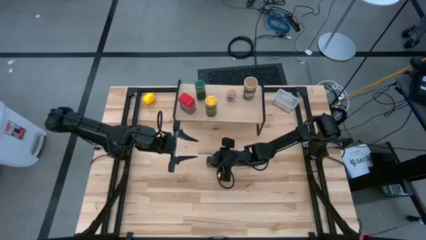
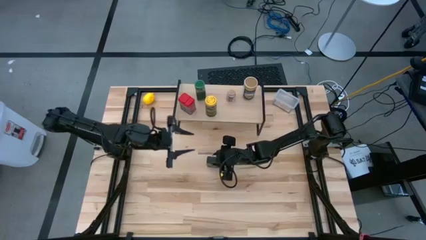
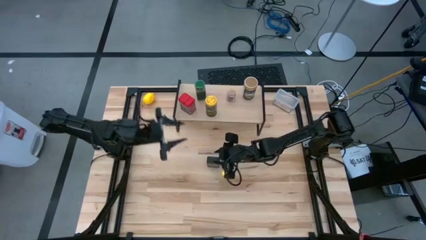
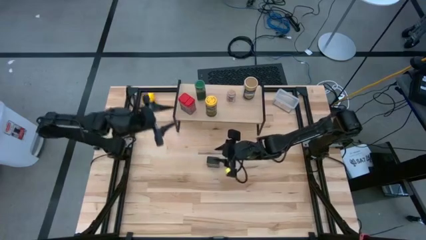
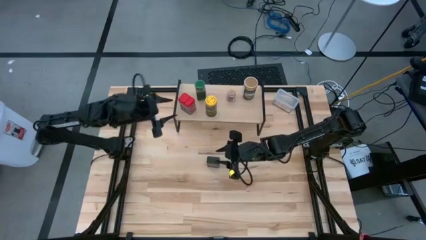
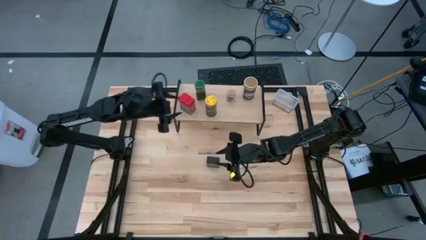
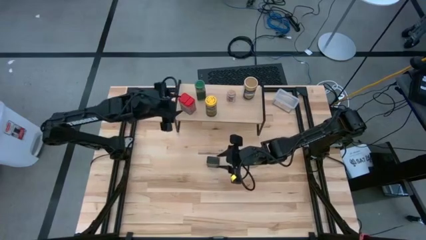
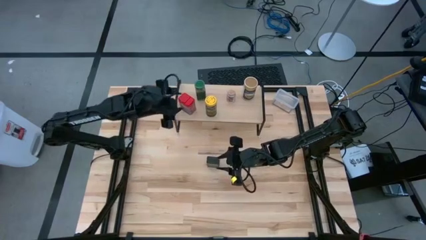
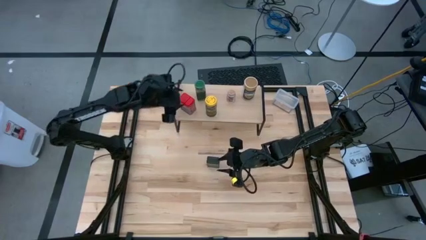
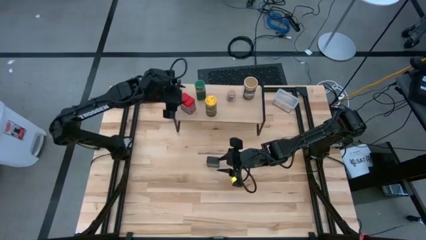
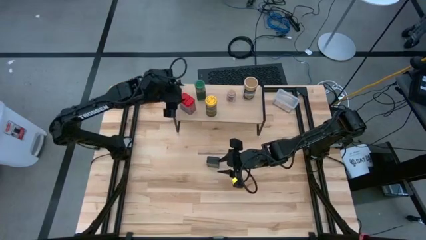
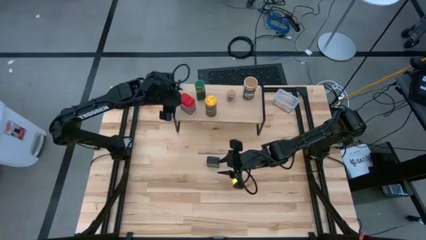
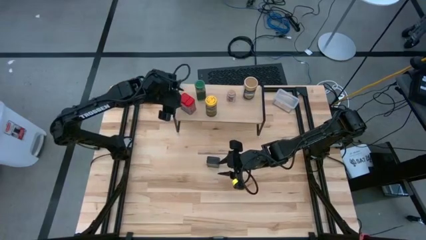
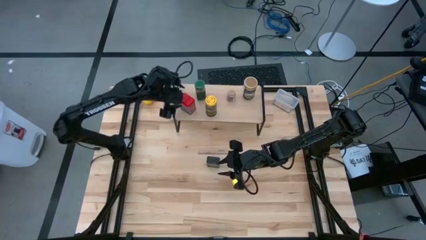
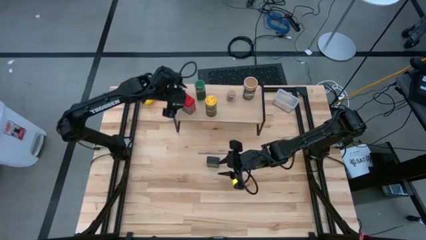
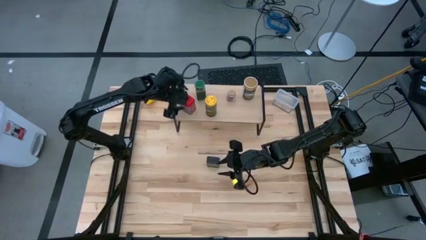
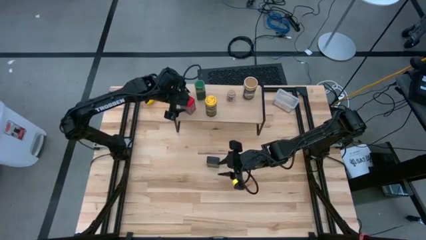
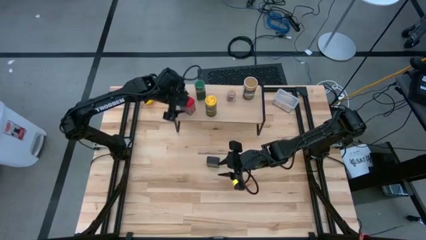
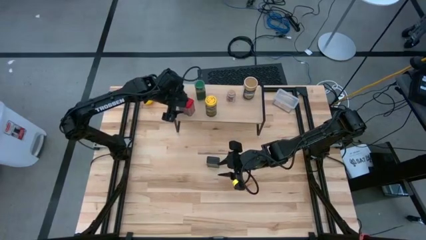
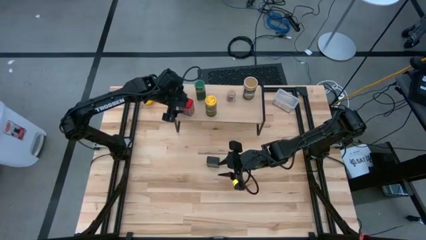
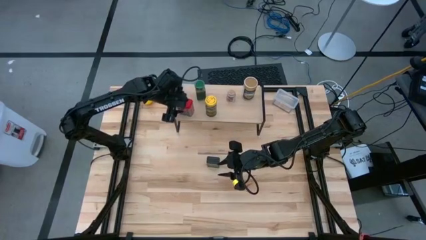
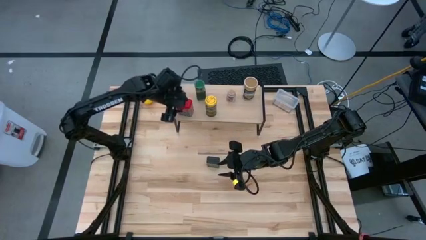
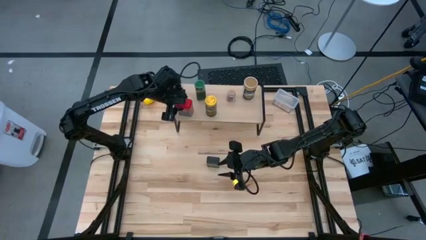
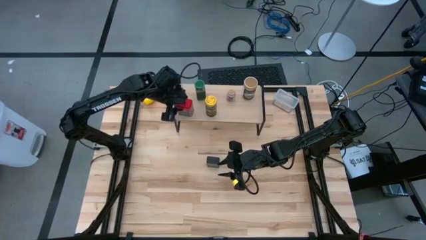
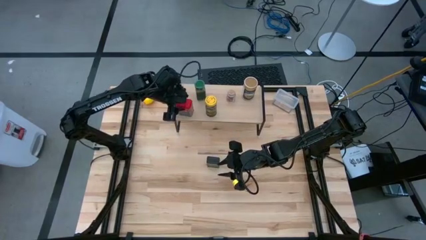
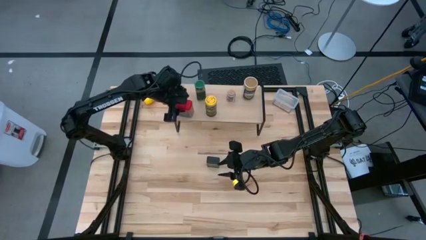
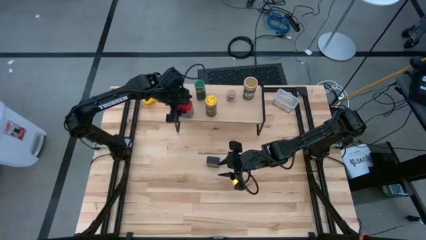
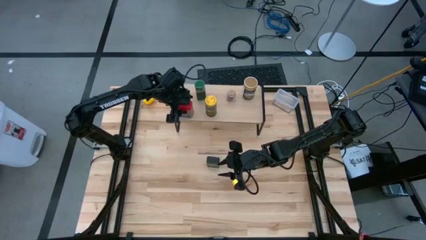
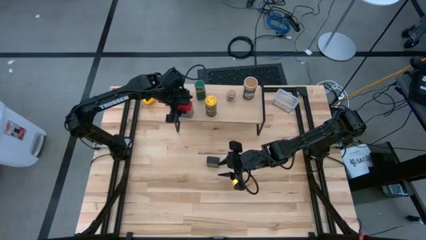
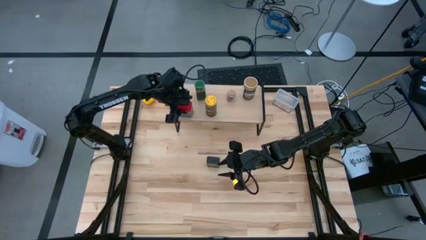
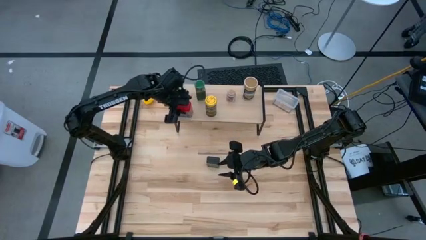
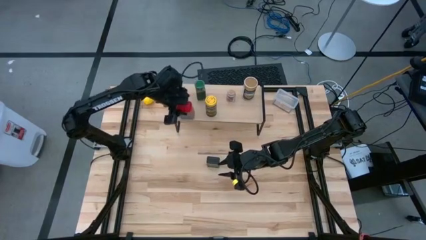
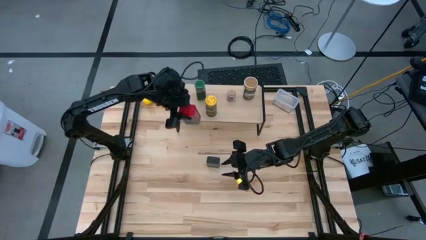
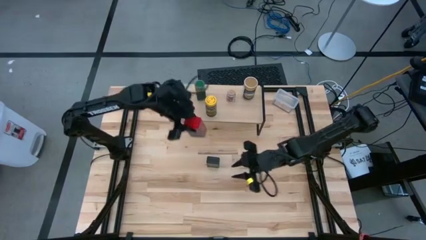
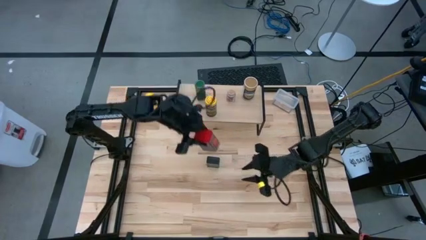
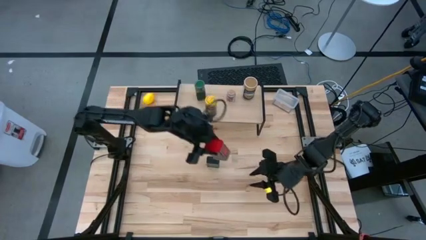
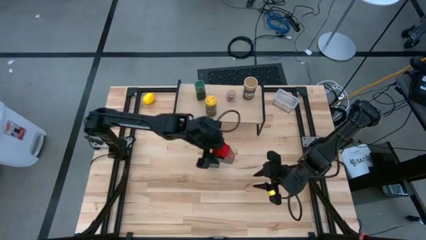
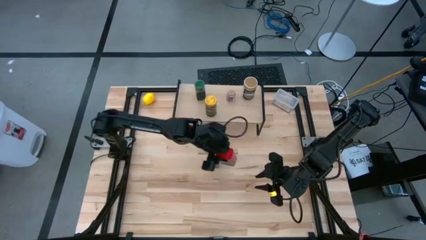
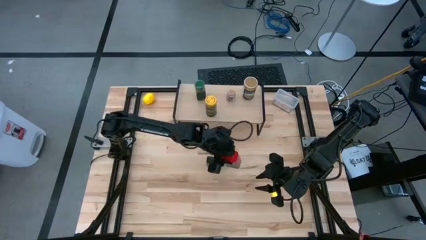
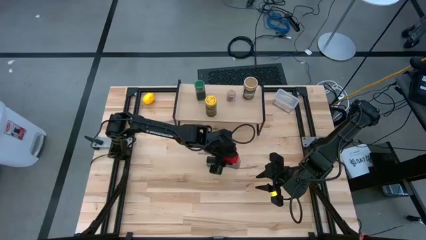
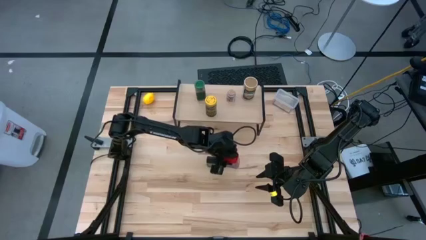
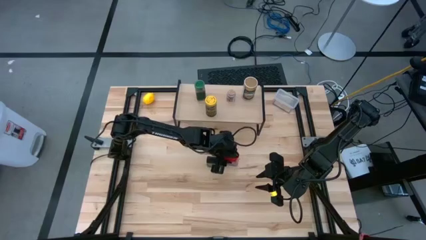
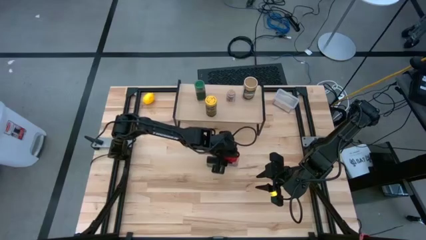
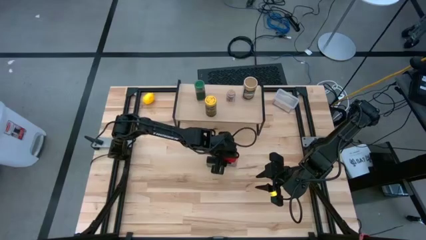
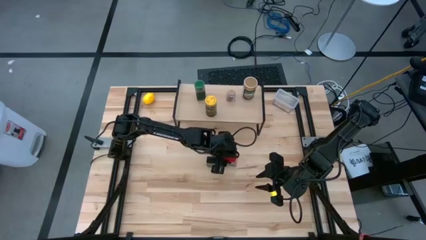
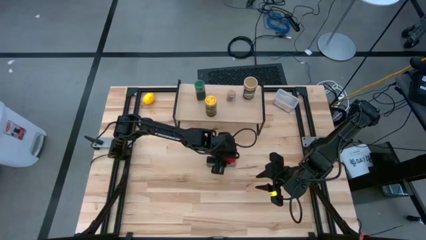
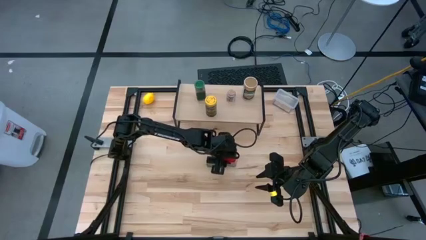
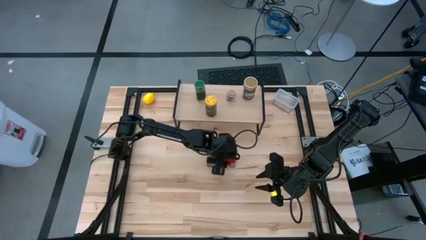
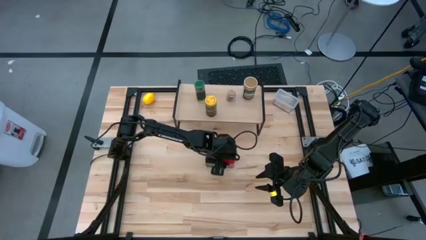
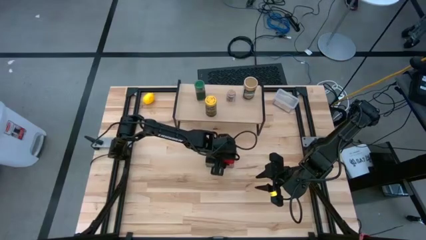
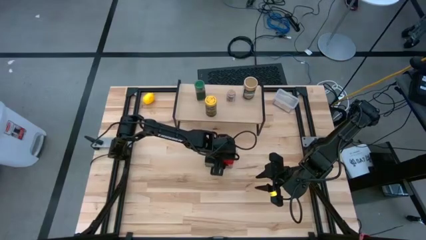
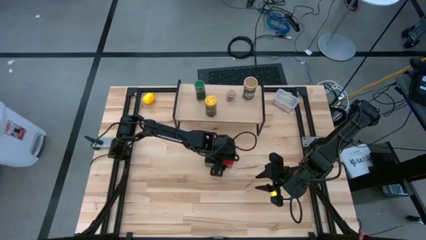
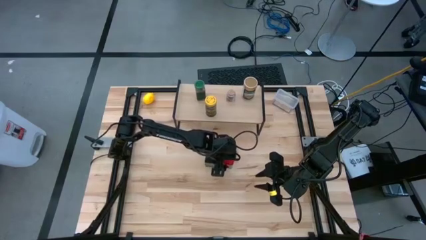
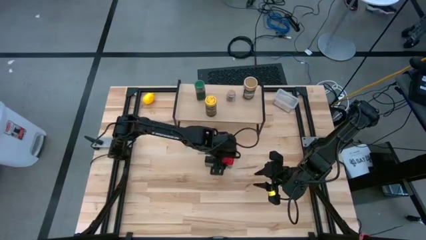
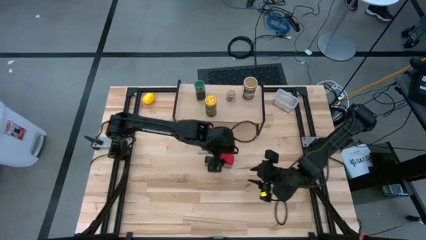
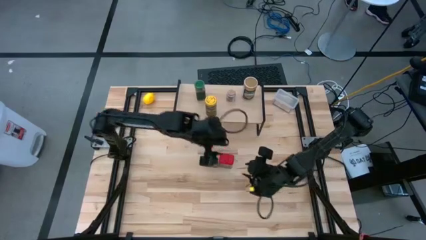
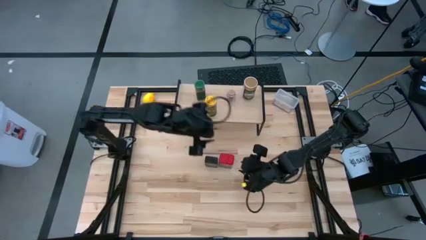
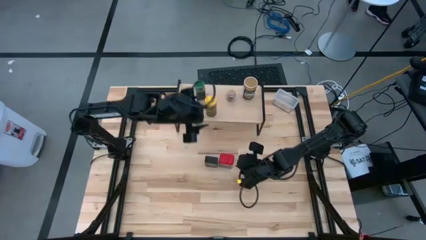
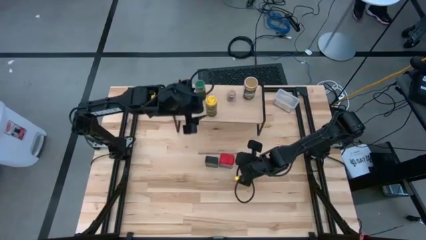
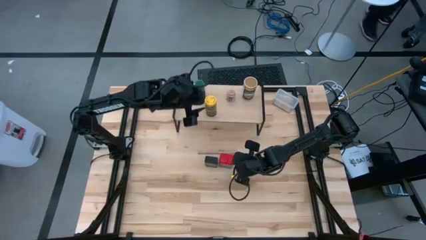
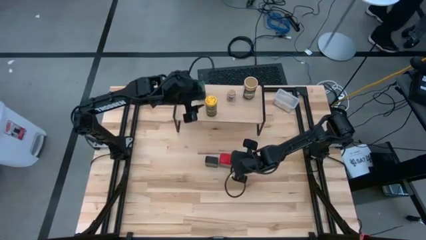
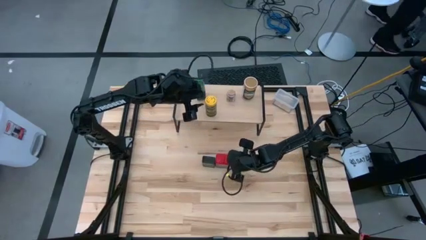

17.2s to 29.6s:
Task: Shelf spices
Remove the red seasoning can from the shelf
